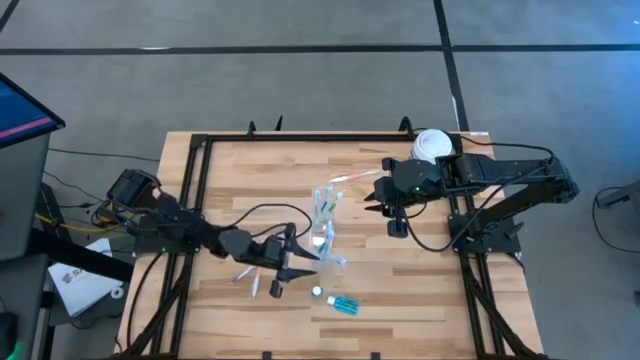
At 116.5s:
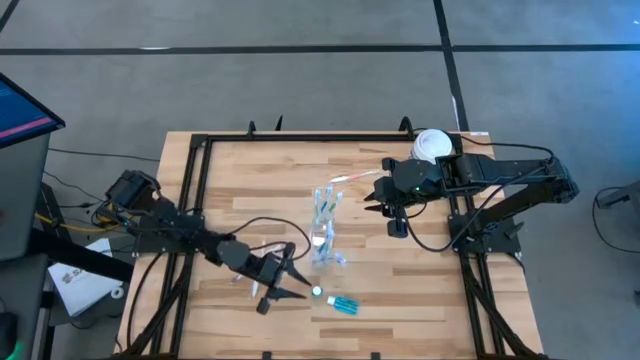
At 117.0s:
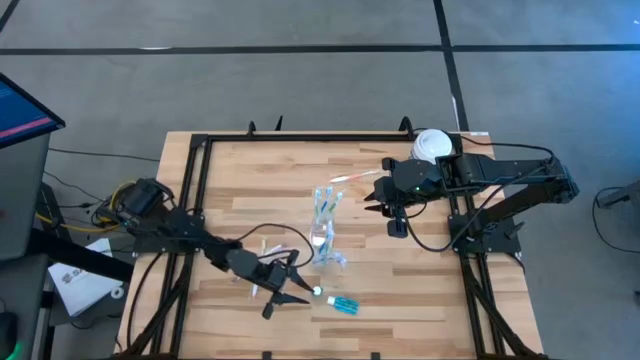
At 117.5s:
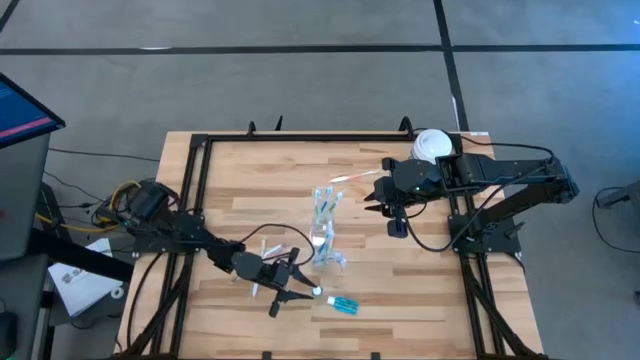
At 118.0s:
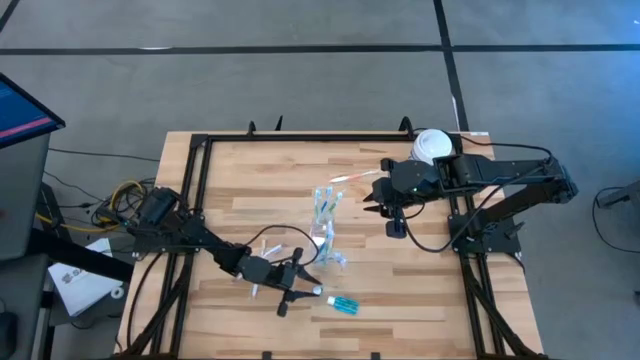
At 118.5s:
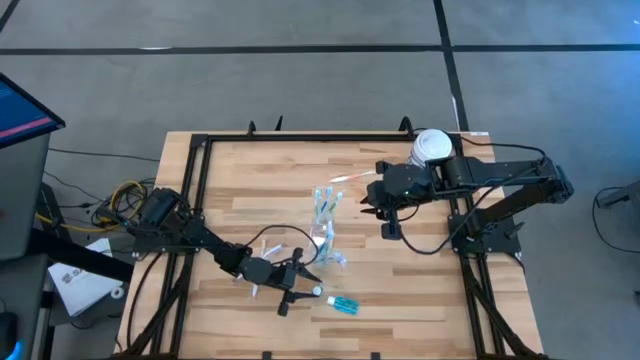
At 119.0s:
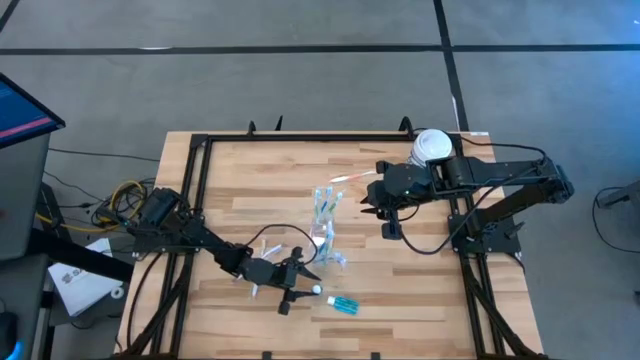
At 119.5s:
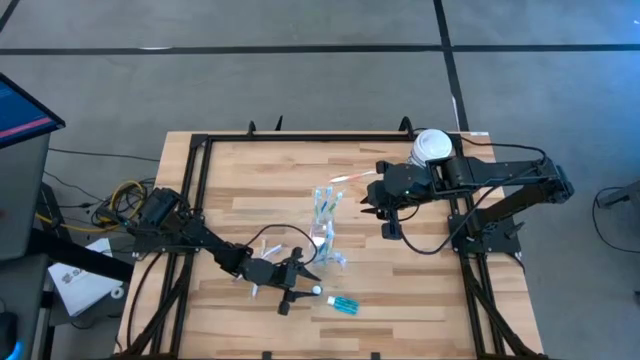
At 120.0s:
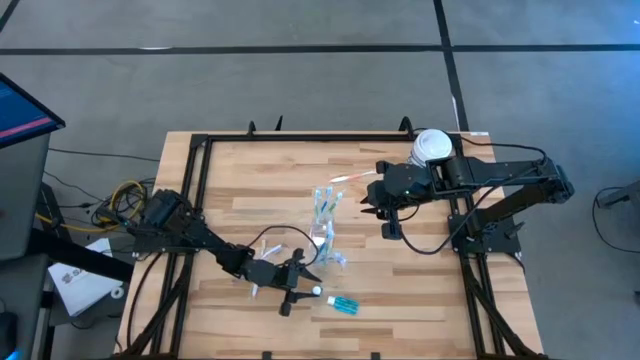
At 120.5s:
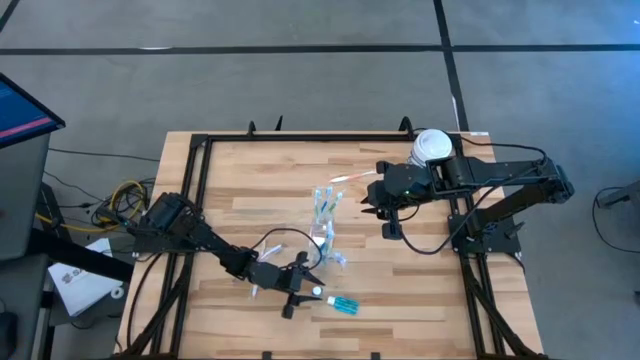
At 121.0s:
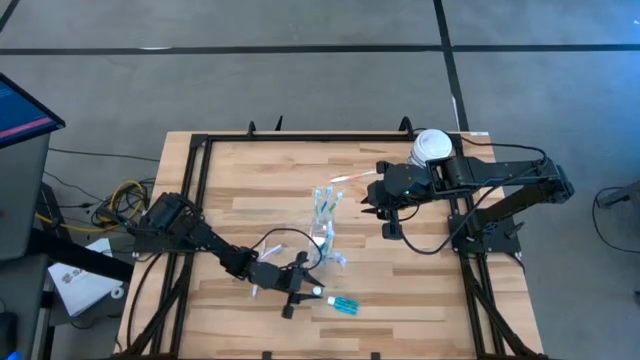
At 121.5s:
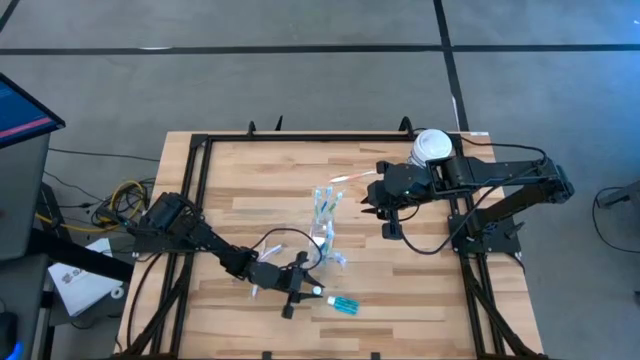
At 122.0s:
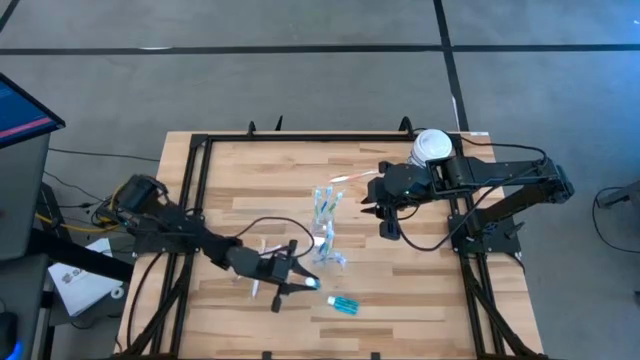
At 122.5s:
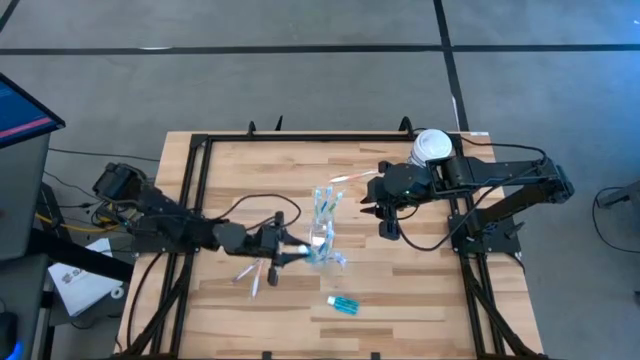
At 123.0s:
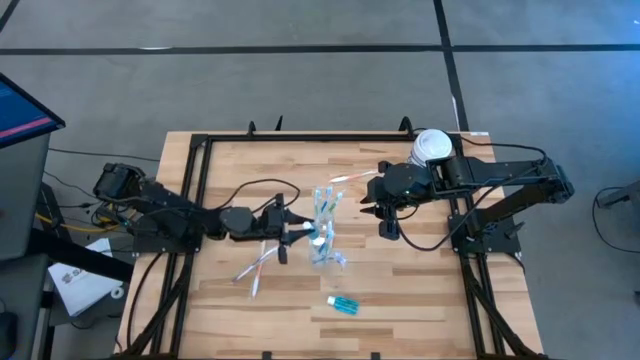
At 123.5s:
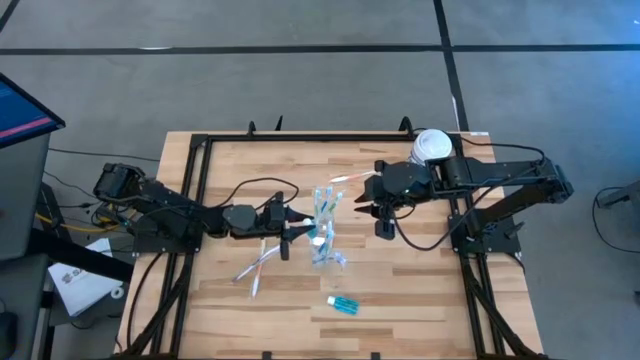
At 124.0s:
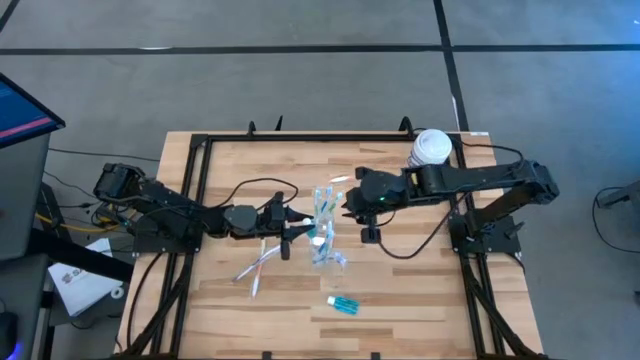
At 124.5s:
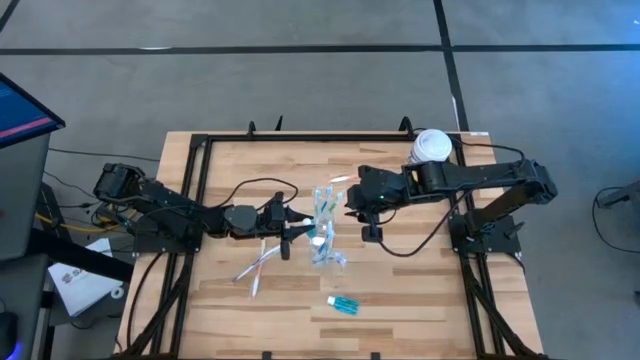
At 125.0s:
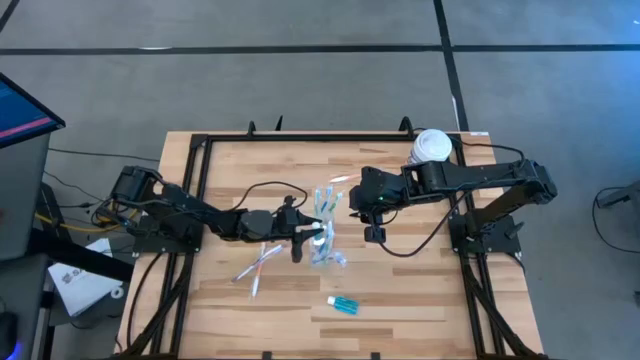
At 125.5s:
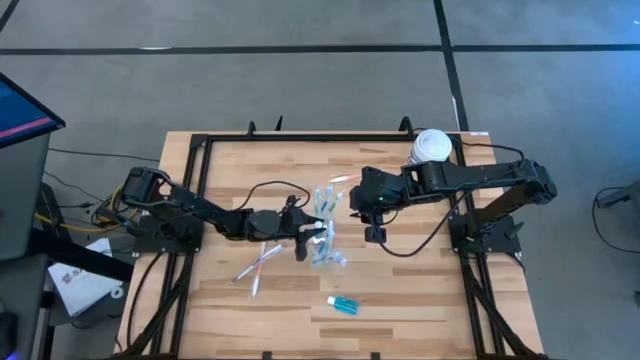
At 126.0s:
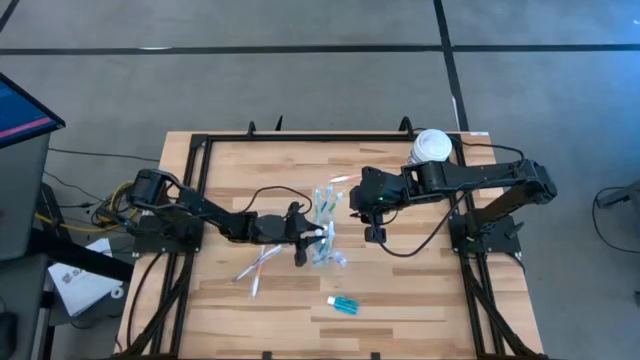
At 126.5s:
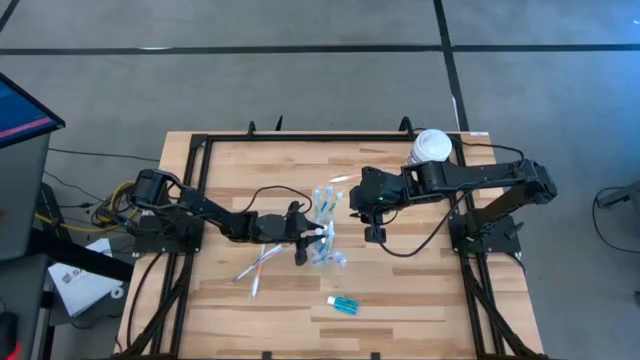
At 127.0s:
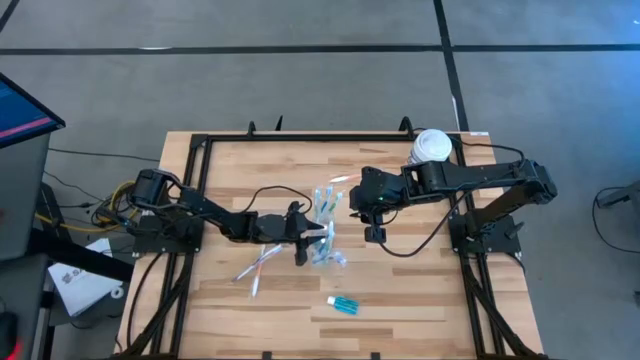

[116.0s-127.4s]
Task: Pick & Place toothbrushing station
Put the left blue mouthwash into the transparent organizer

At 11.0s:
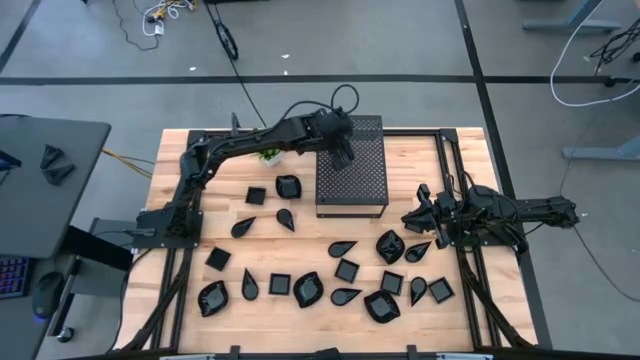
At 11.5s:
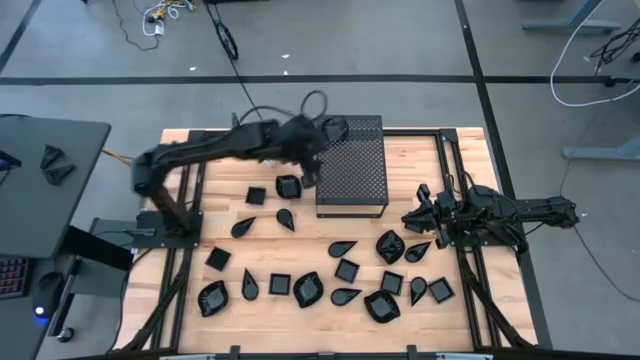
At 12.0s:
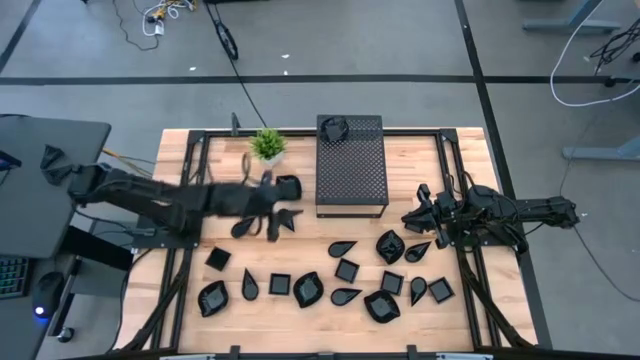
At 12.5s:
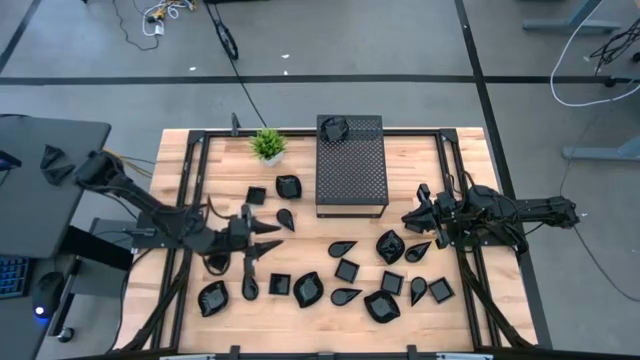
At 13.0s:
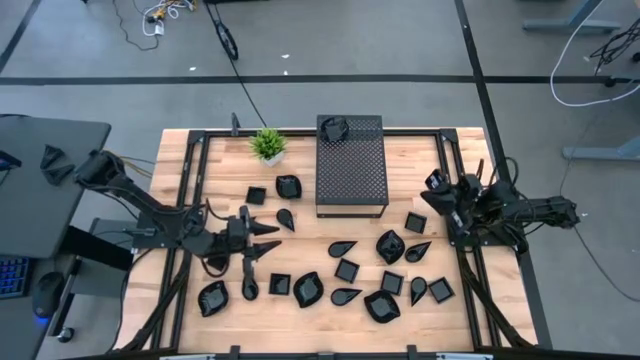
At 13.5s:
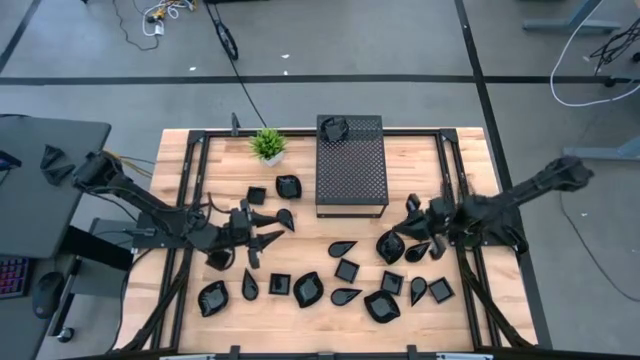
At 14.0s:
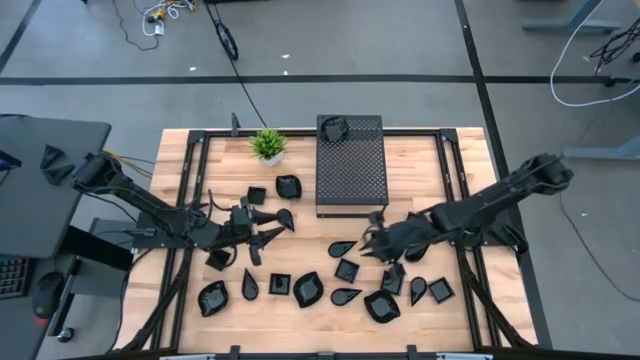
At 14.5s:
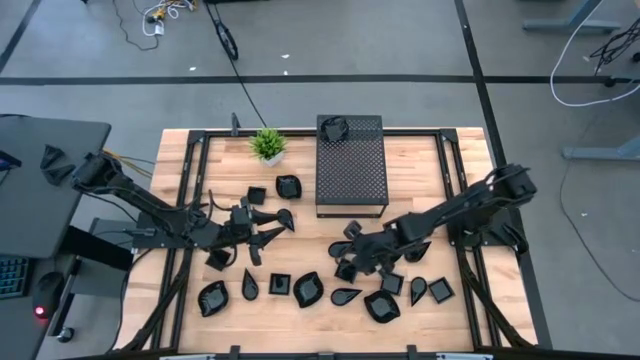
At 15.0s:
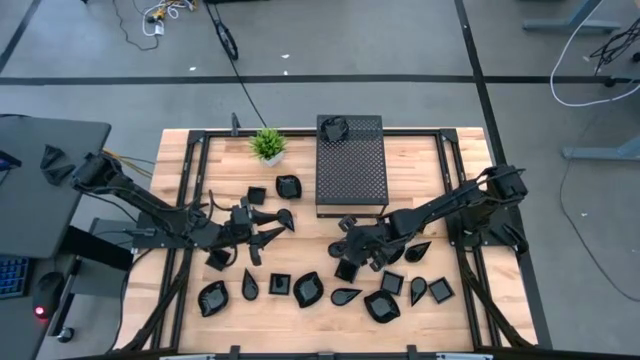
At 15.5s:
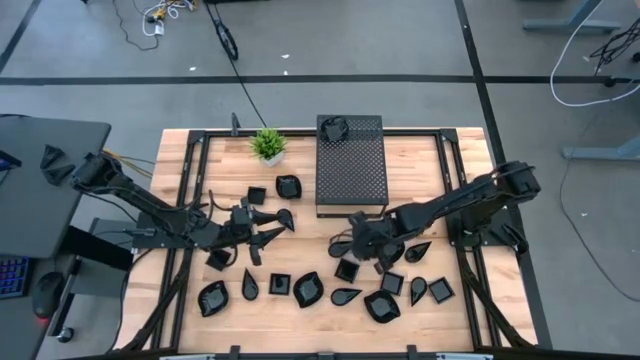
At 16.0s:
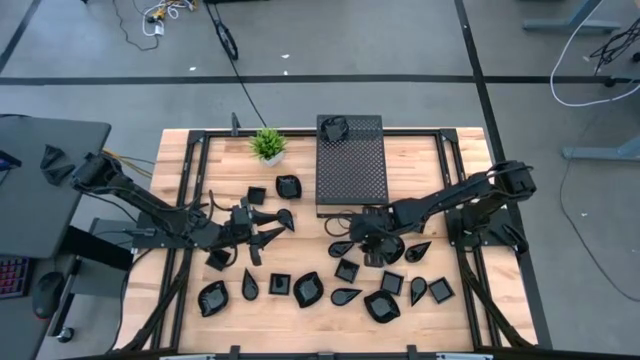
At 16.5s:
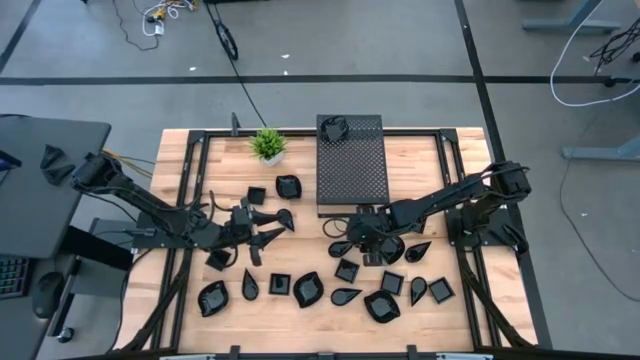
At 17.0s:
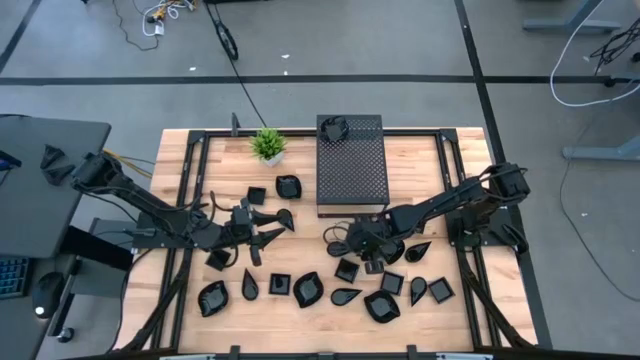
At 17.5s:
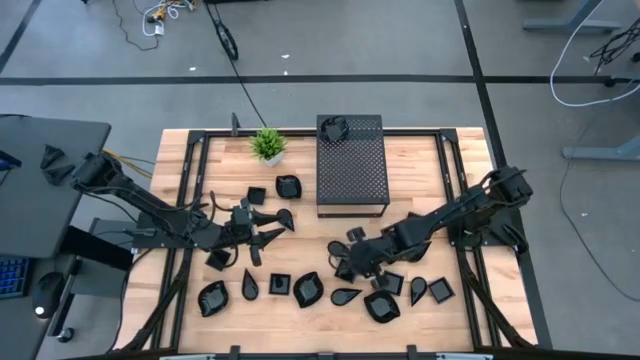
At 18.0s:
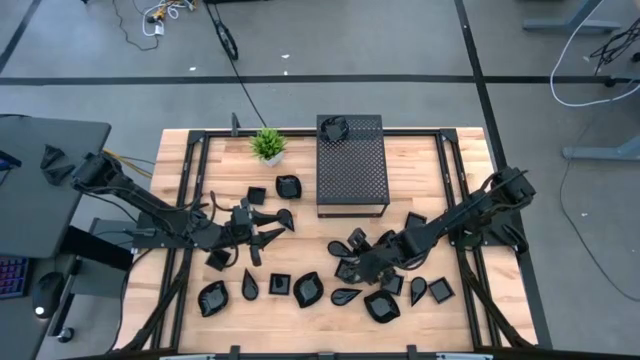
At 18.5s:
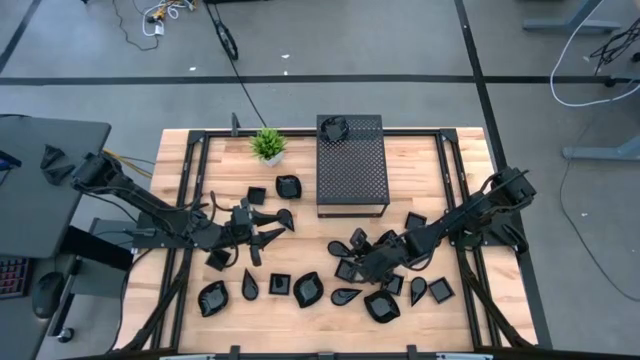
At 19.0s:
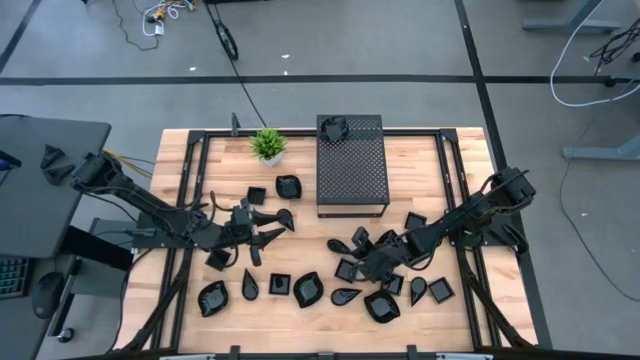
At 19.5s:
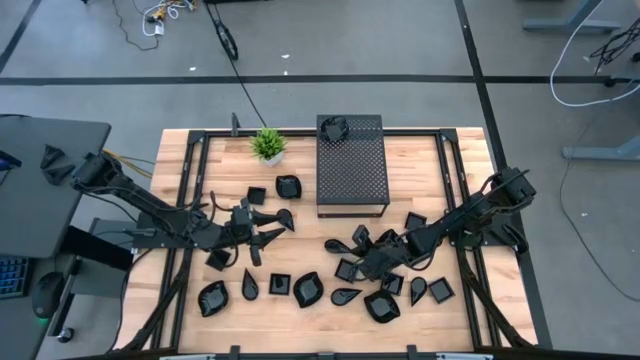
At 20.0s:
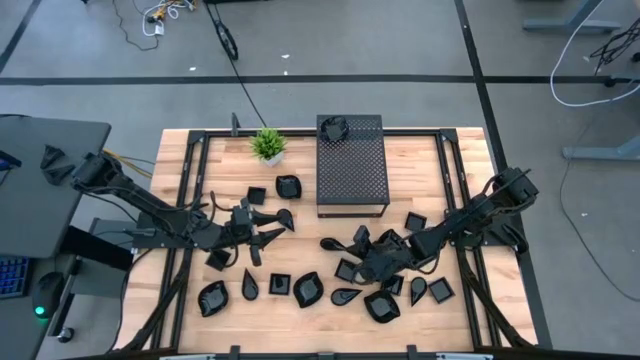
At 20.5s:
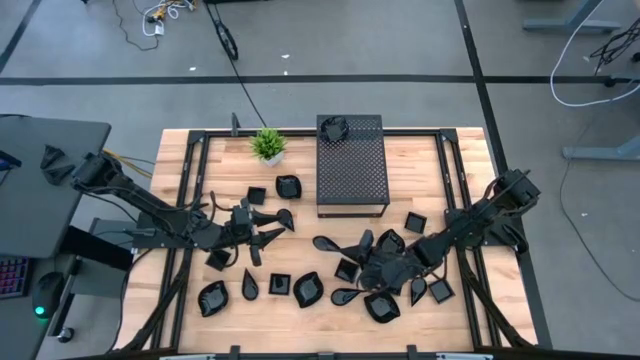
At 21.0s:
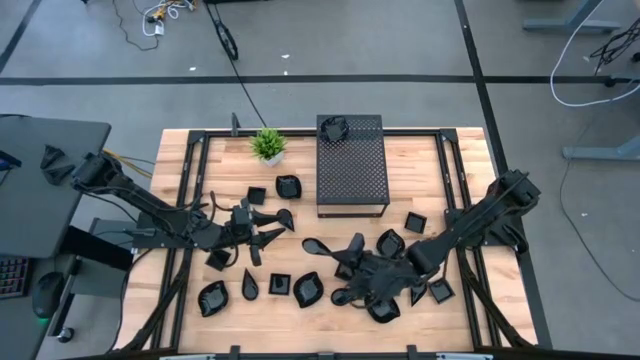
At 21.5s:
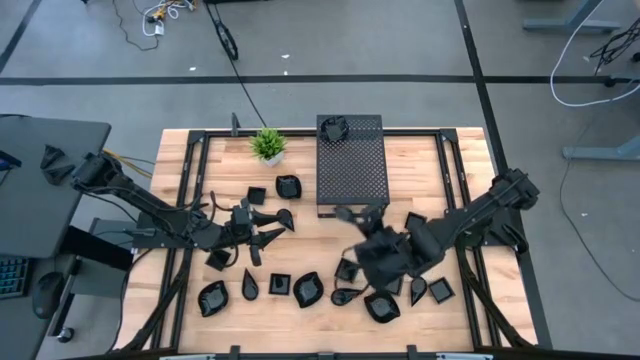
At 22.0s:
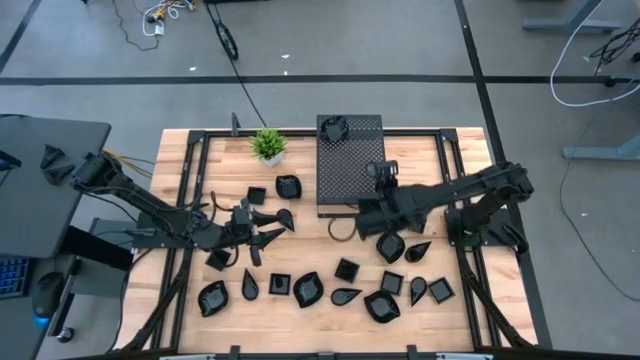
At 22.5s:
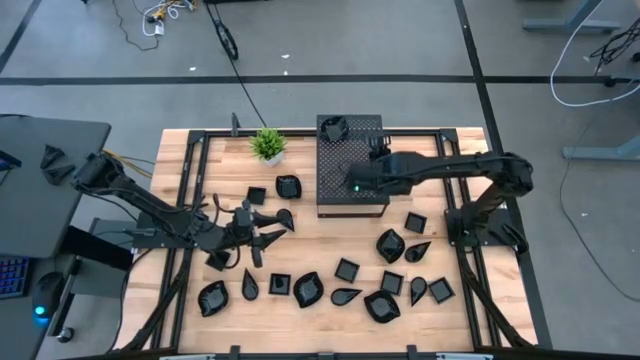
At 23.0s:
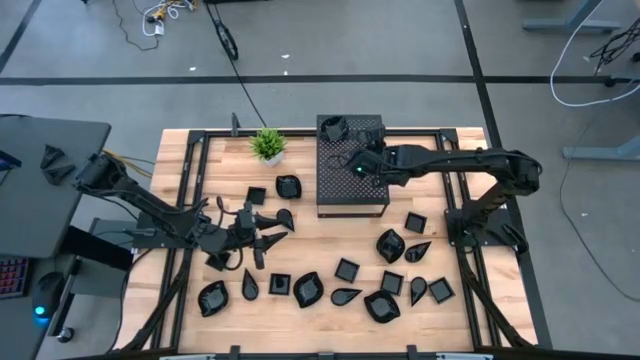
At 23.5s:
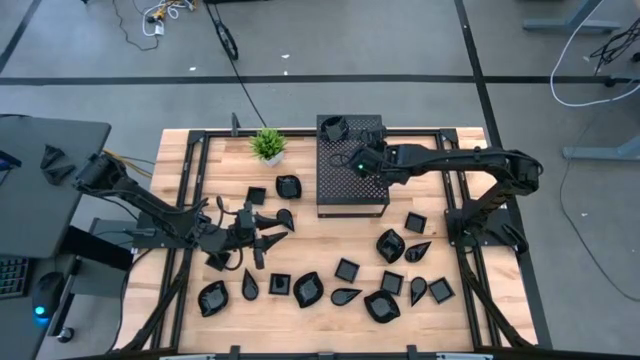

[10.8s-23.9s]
Task: Pick & Place Mini shaped plates
Put the drop shaped plate on the shelf
